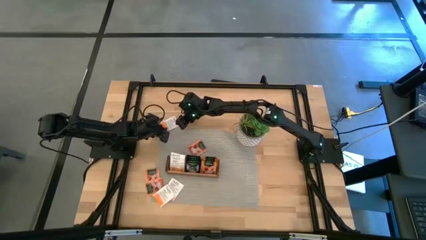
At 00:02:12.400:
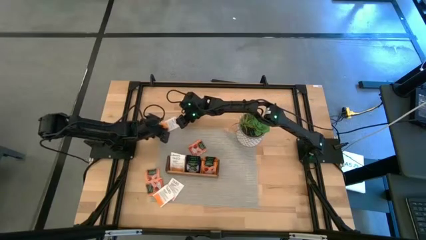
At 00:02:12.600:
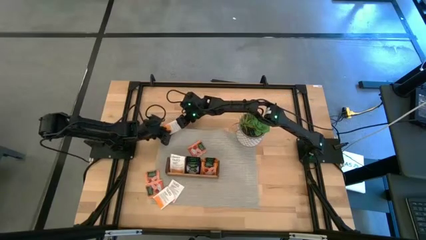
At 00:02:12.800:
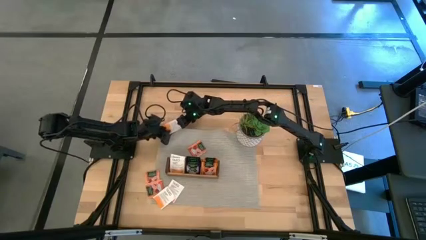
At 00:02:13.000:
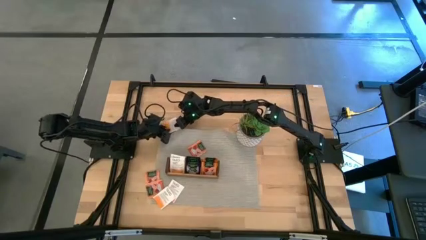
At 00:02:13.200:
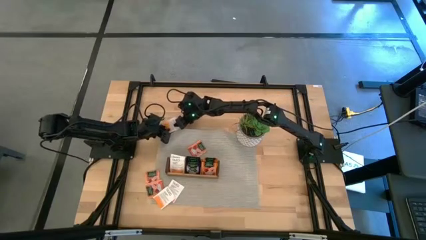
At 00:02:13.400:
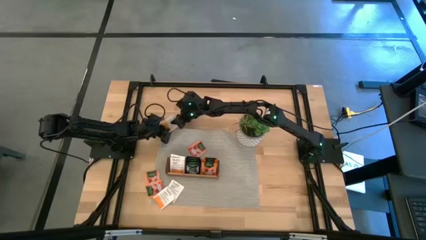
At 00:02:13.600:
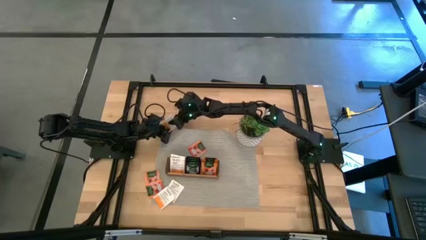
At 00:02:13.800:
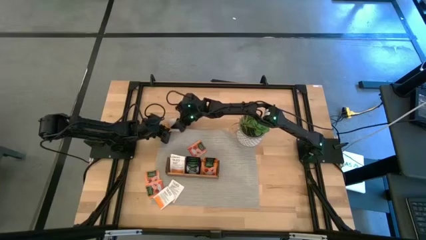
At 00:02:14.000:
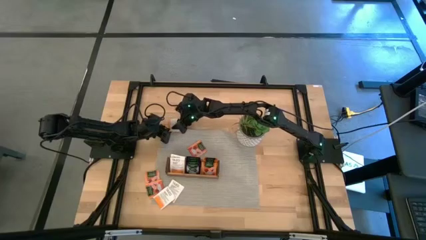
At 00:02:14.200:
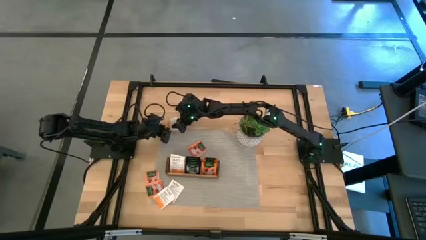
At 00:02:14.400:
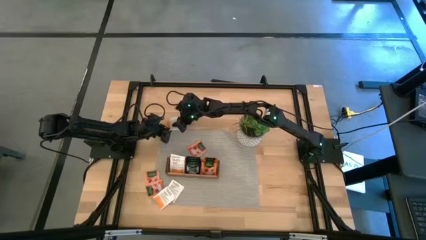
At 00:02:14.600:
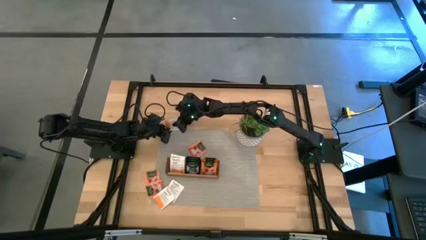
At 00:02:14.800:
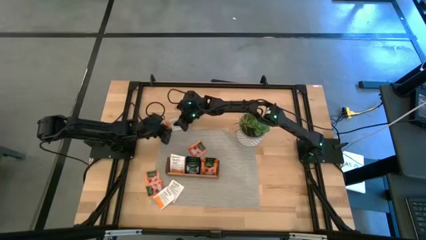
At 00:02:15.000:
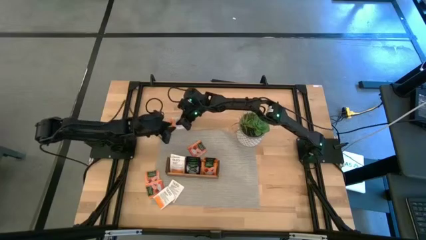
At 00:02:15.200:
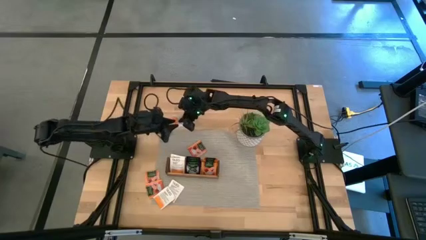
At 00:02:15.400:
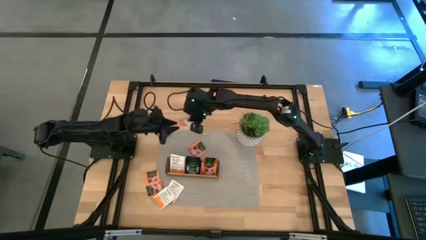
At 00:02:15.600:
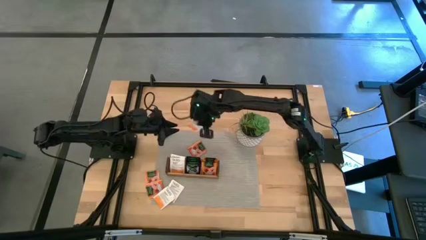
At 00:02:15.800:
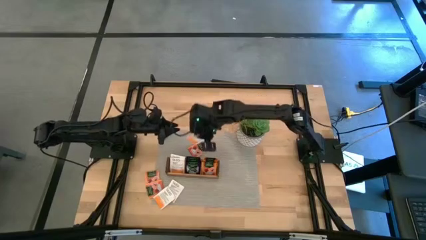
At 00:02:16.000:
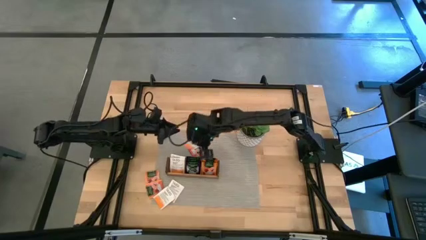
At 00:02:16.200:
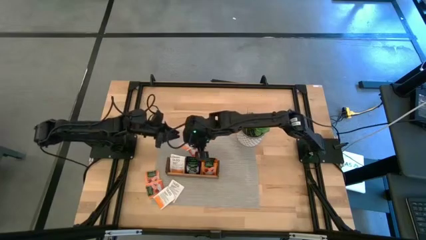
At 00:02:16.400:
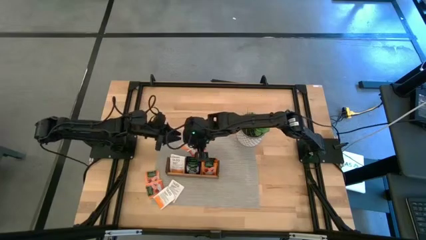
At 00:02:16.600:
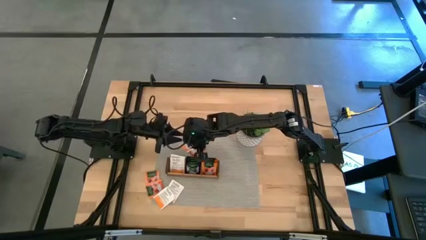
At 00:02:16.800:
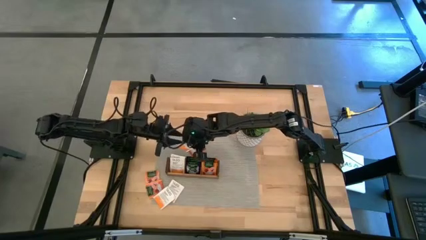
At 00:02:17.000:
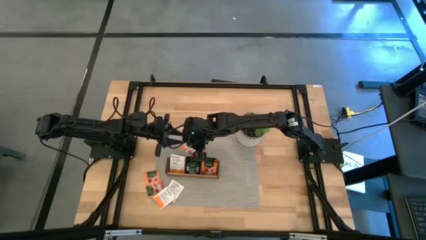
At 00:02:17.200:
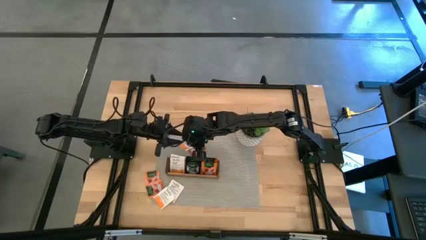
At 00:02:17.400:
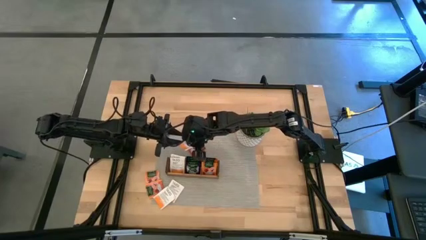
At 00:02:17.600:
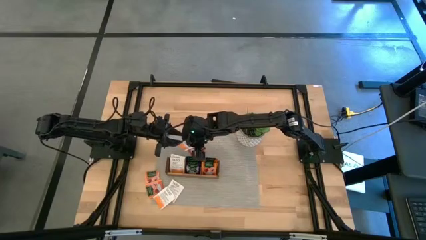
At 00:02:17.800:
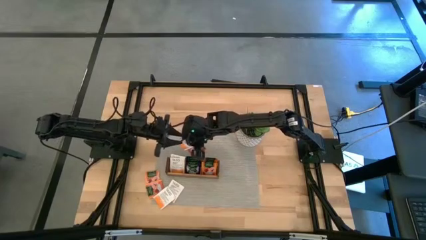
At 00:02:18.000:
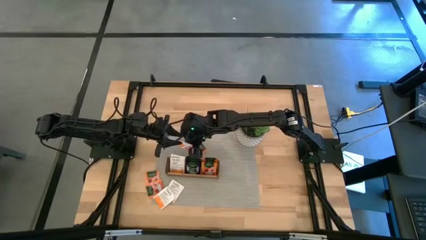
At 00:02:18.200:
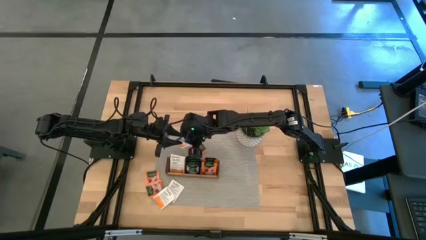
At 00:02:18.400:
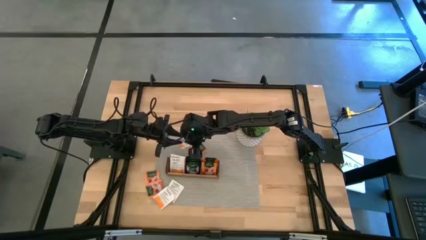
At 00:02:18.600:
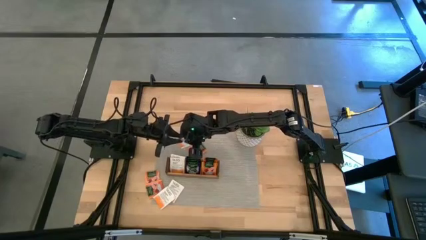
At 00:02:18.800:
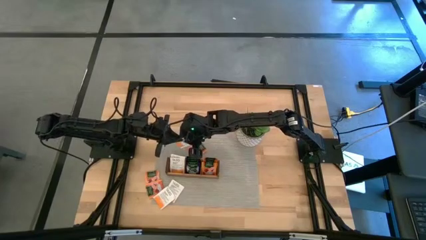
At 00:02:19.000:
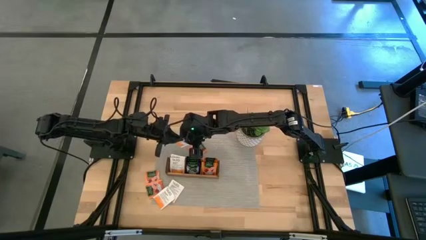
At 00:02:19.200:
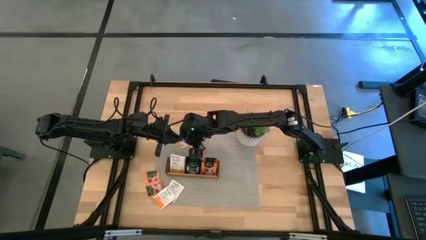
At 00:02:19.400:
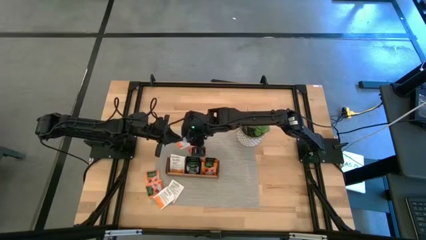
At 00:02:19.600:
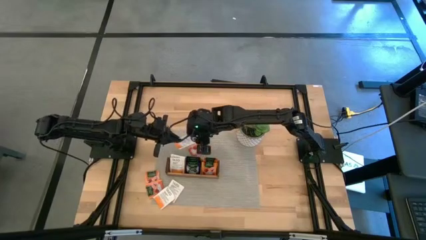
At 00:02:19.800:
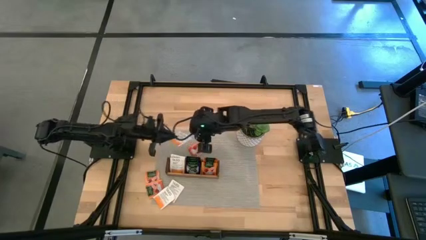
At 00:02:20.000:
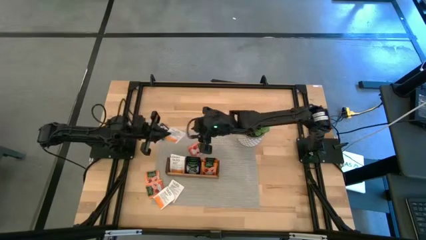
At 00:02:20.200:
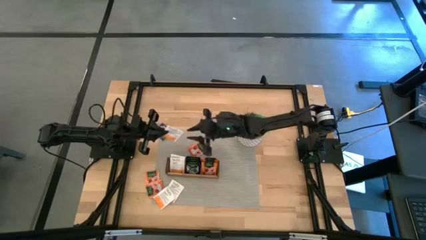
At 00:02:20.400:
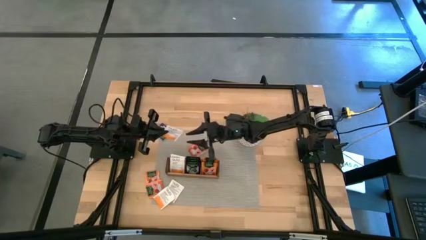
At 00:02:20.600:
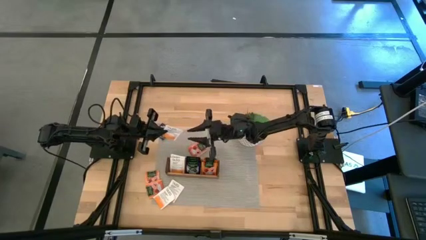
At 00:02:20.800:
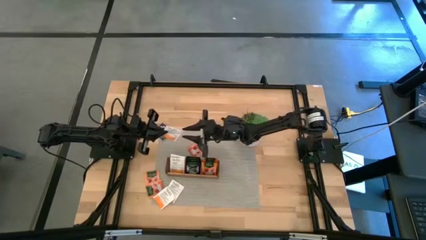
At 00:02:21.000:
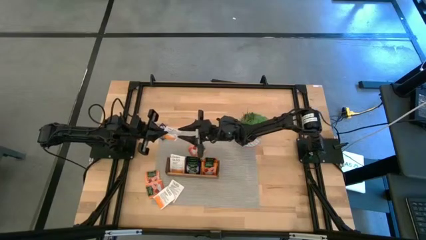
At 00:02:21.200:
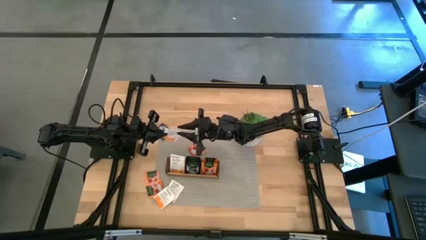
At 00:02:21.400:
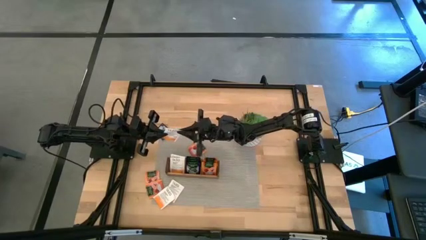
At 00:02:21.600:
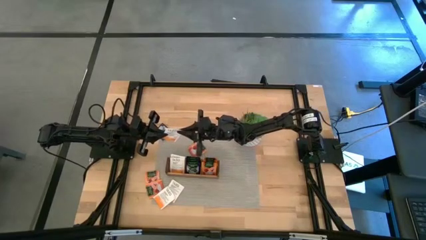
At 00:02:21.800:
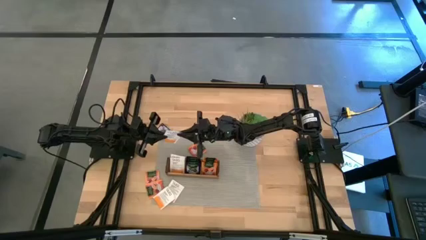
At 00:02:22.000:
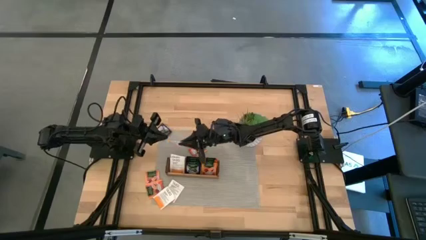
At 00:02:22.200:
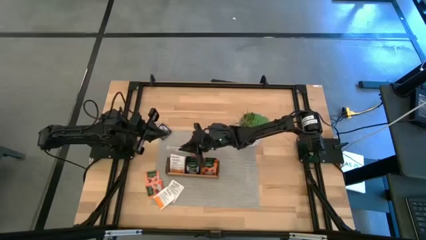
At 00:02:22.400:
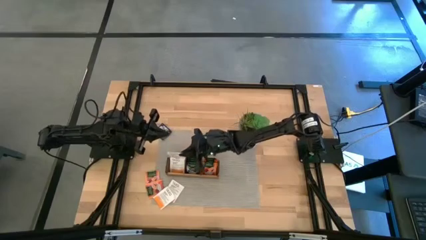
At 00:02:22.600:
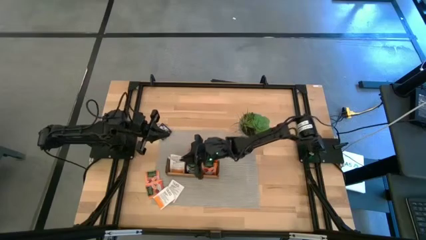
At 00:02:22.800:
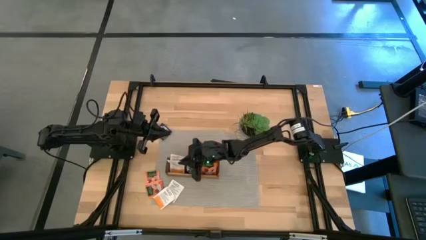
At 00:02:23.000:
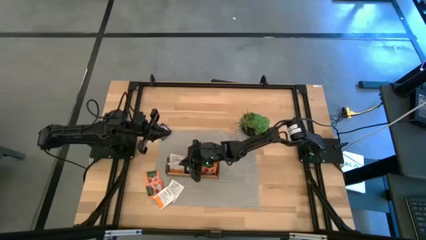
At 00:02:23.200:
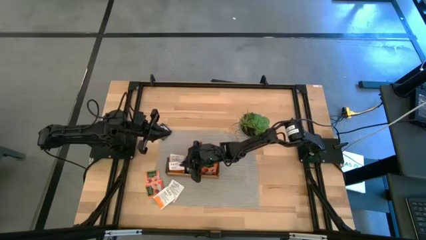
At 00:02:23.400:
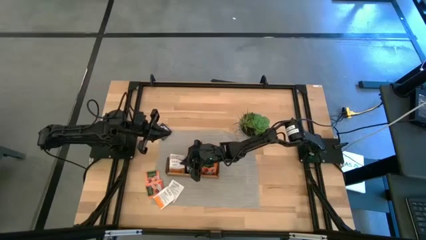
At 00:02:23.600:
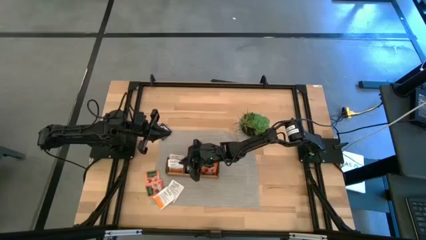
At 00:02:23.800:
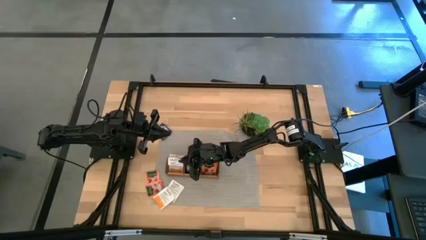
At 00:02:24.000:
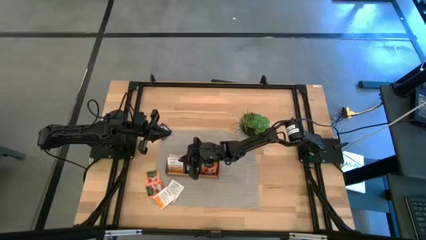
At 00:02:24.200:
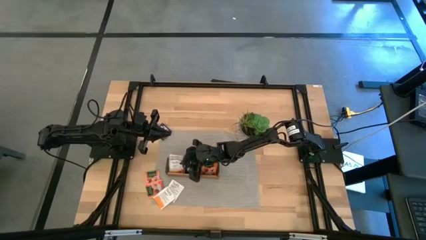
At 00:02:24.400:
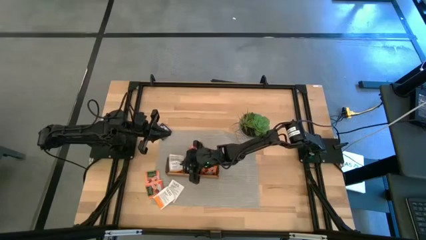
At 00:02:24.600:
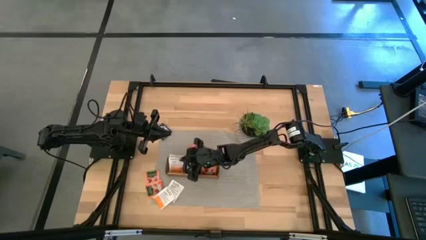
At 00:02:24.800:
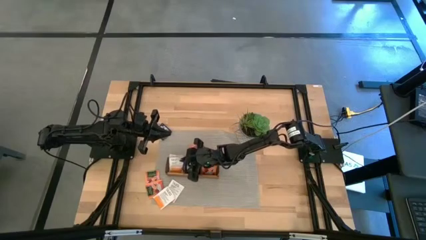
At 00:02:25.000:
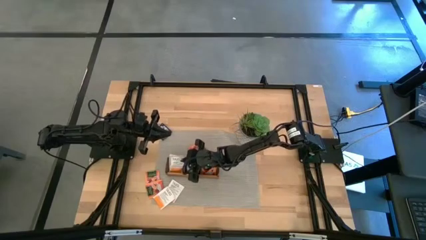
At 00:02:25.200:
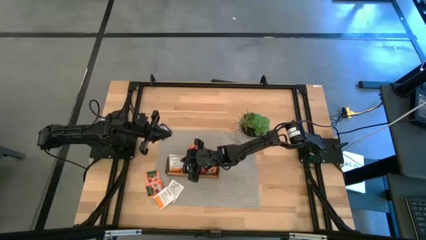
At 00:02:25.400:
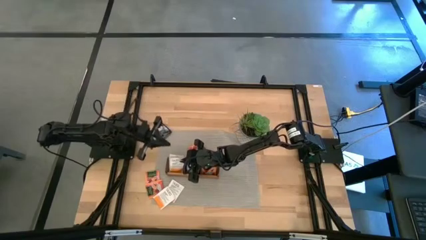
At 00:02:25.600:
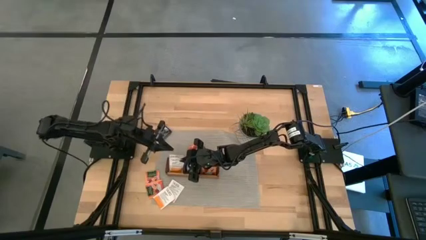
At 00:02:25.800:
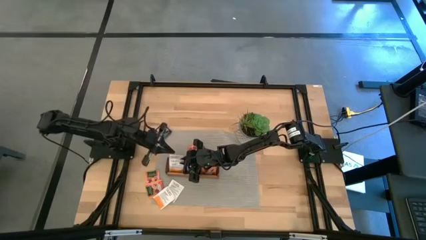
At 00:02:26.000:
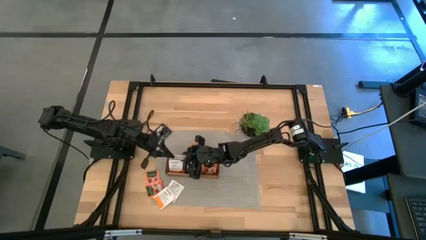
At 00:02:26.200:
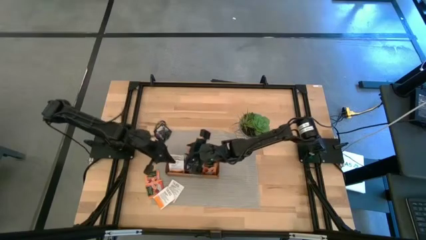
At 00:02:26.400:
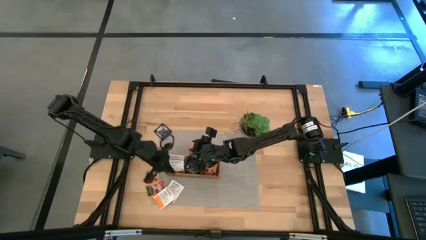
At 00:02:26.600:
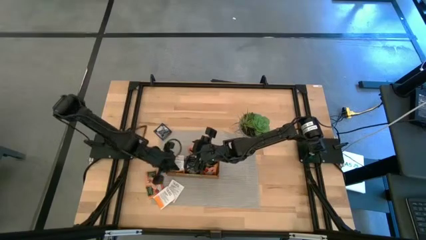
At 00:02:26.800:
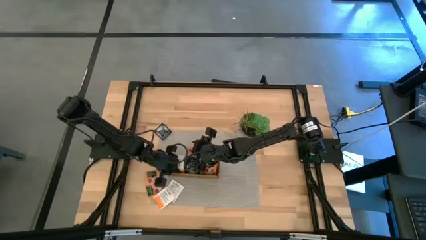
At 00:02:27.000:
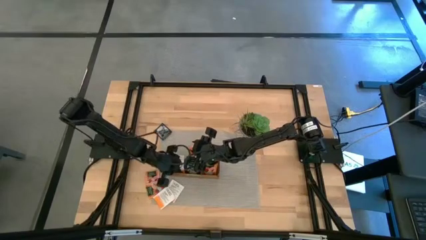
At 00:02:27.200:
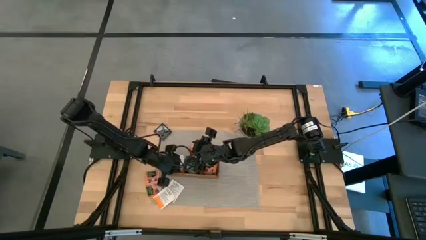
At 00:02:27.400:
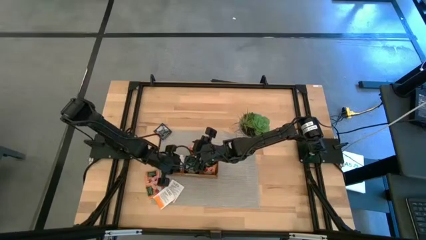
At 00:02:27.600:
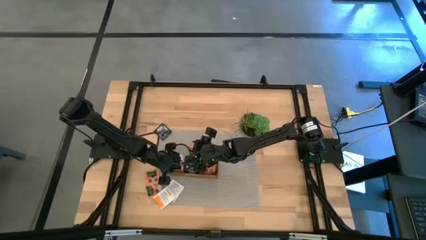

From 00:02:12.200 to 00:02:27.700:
Task: Pick & Place Tea
Put the white tea bag into the left section of the wooden organizer

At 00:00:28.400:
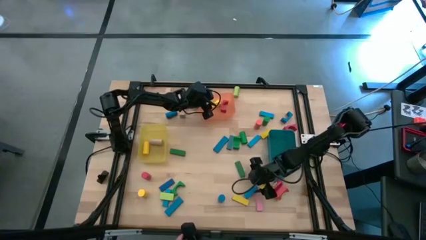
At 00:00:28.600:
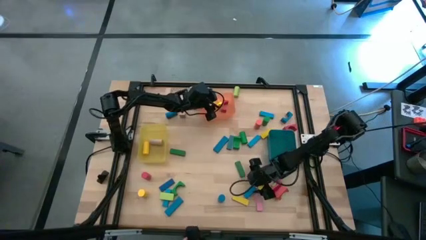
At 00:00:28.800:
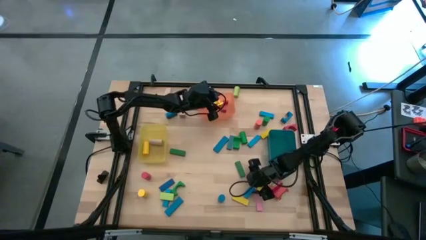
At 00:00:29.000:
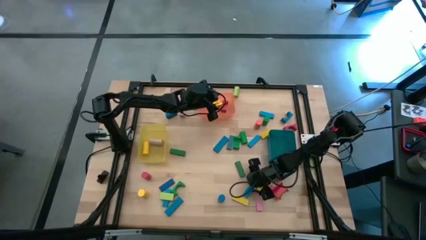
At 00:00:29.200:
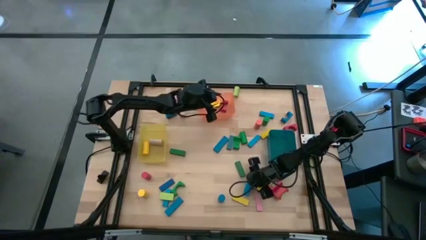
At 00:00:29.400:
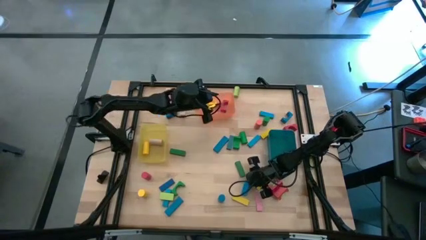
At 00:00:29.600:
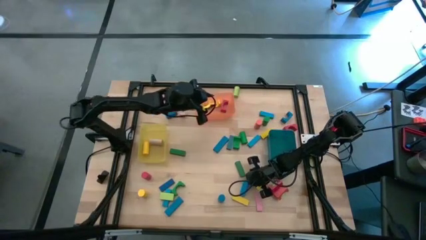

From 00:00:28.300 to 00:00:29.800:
Task: Sort blocks by size
Put the blue rectangle block into the blue bin
